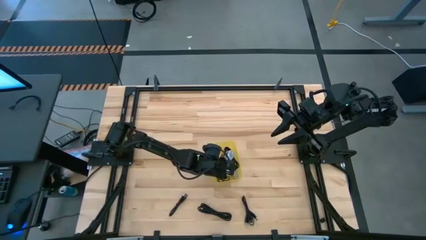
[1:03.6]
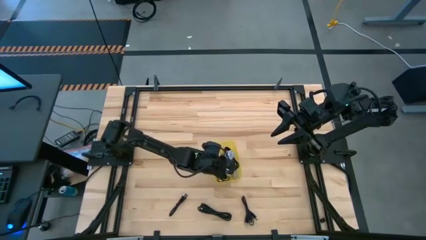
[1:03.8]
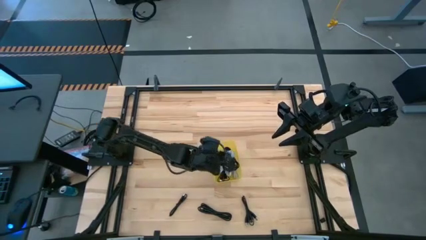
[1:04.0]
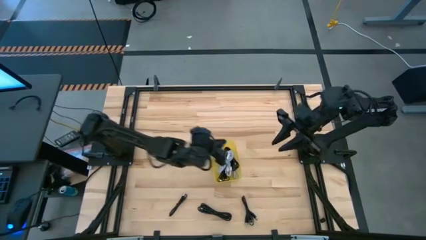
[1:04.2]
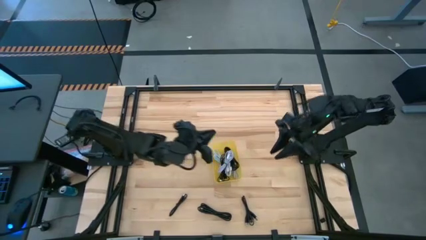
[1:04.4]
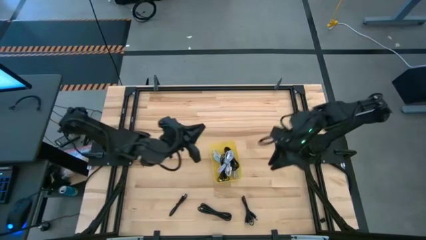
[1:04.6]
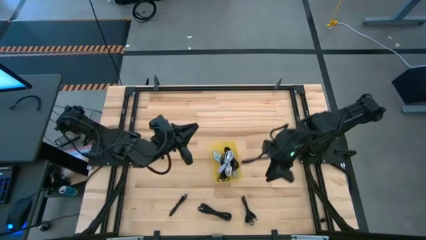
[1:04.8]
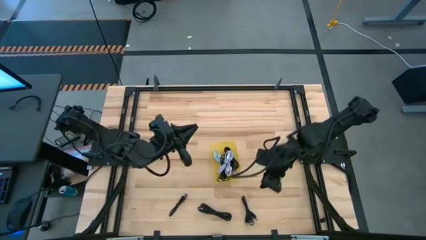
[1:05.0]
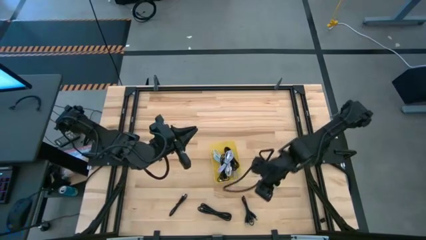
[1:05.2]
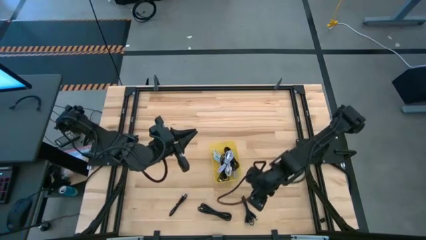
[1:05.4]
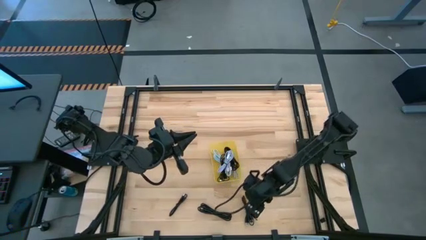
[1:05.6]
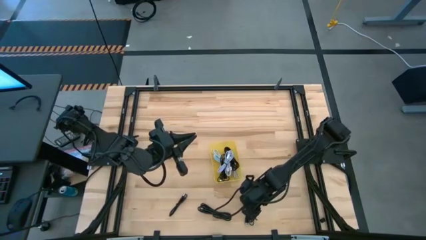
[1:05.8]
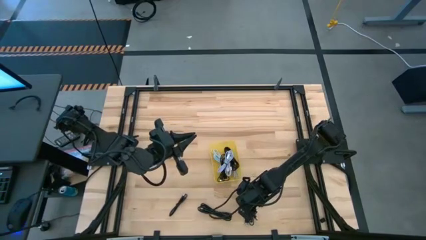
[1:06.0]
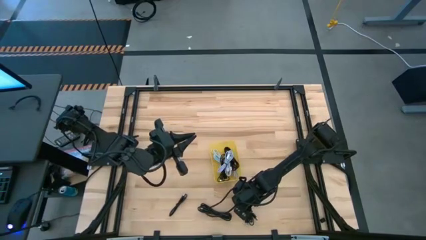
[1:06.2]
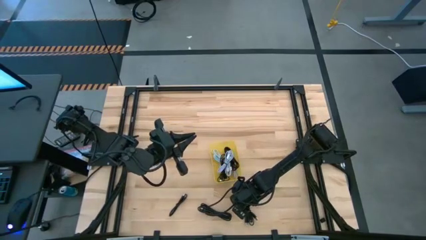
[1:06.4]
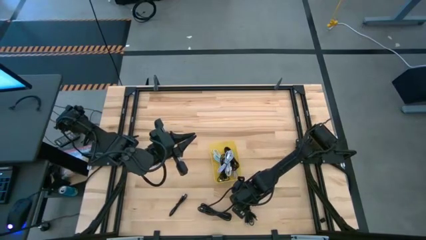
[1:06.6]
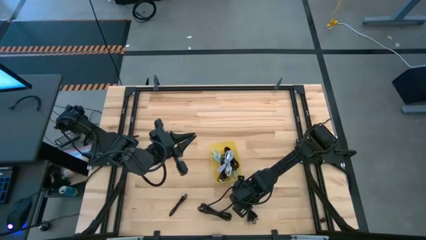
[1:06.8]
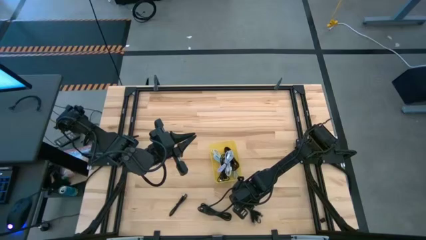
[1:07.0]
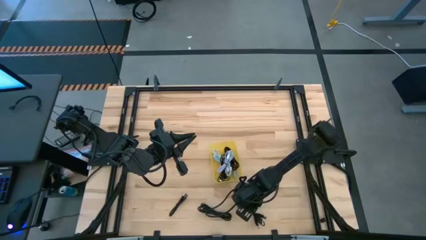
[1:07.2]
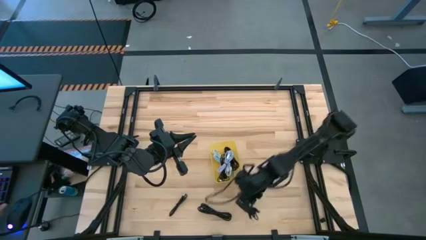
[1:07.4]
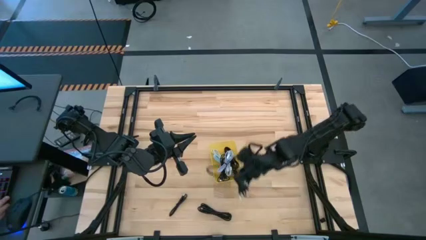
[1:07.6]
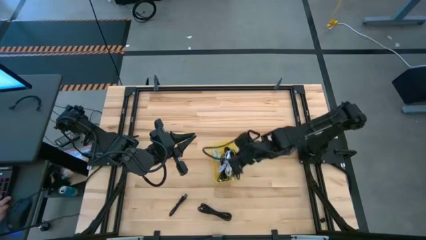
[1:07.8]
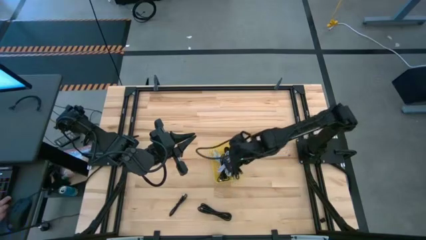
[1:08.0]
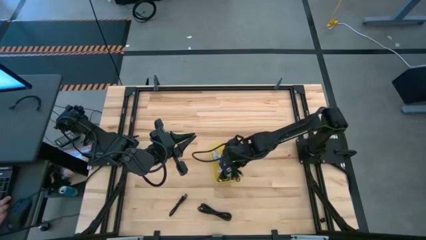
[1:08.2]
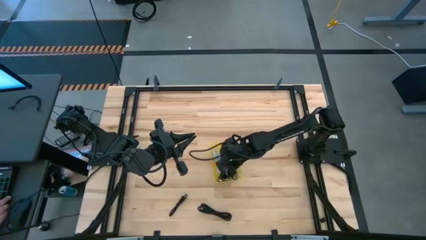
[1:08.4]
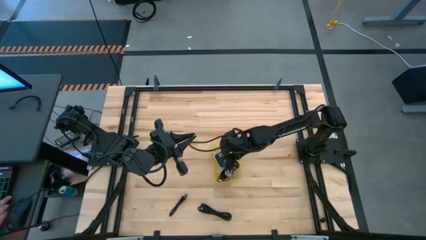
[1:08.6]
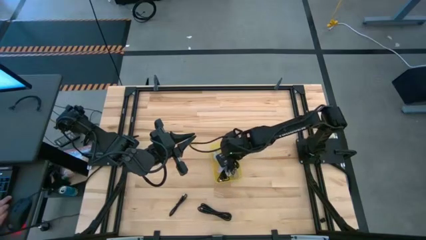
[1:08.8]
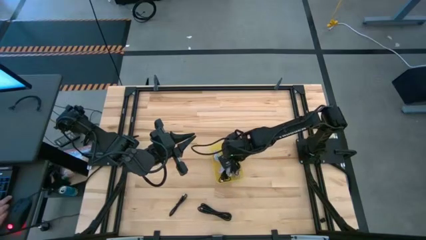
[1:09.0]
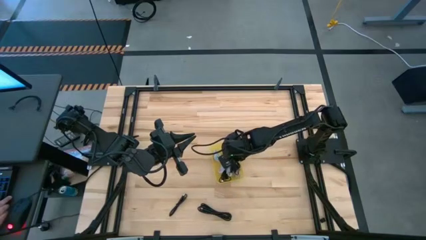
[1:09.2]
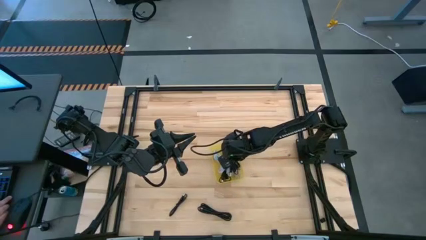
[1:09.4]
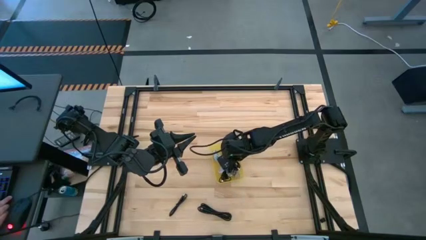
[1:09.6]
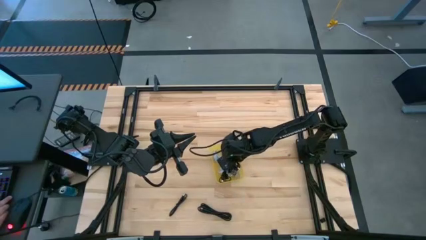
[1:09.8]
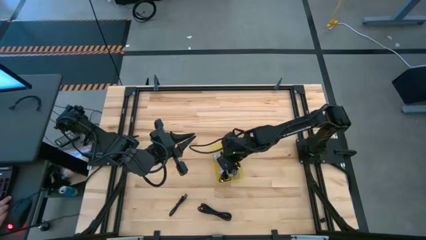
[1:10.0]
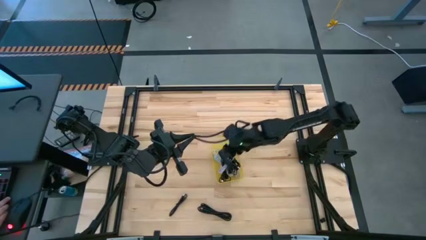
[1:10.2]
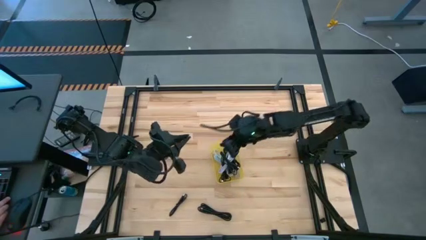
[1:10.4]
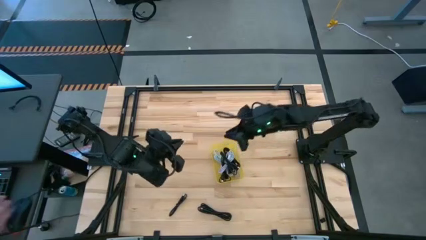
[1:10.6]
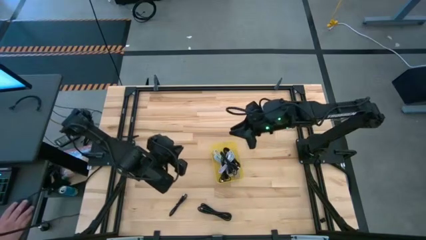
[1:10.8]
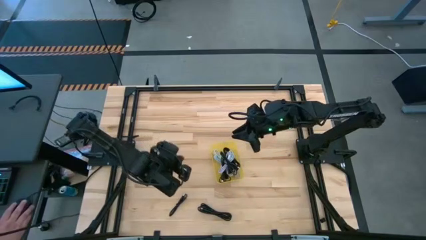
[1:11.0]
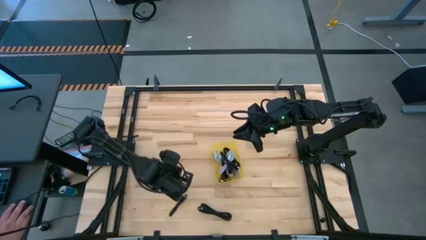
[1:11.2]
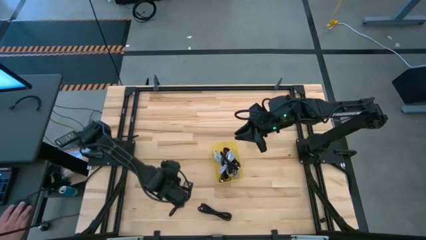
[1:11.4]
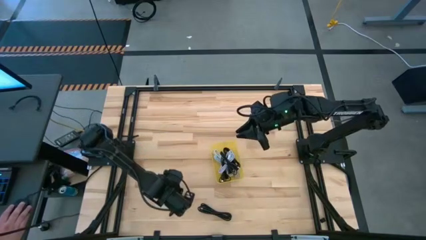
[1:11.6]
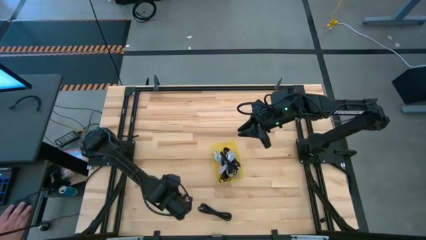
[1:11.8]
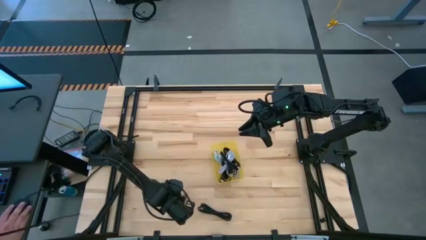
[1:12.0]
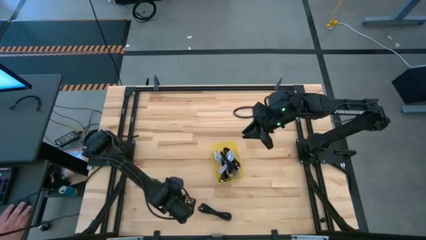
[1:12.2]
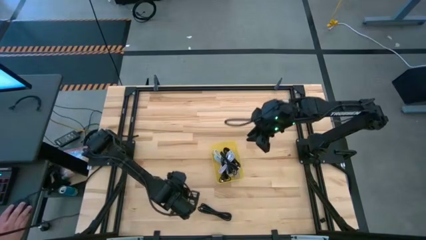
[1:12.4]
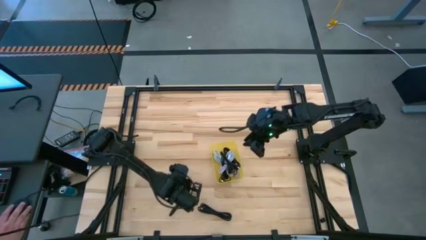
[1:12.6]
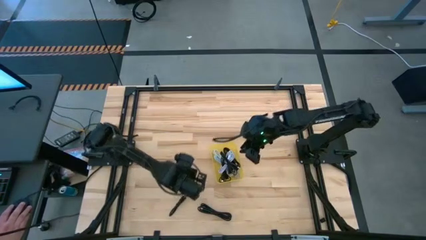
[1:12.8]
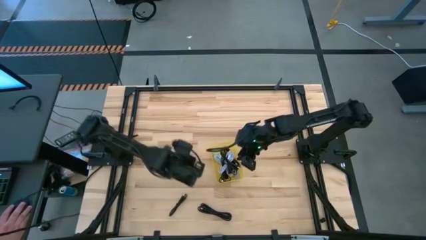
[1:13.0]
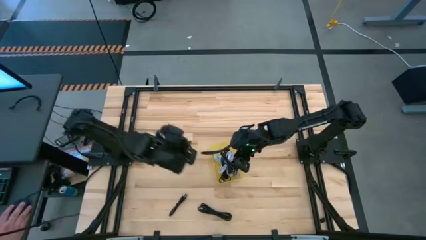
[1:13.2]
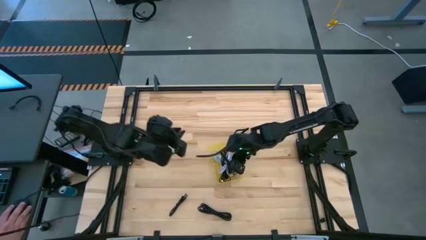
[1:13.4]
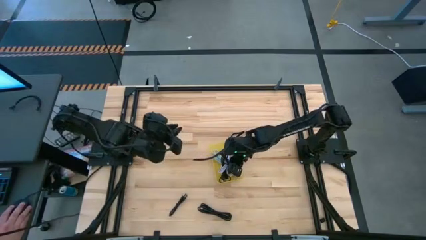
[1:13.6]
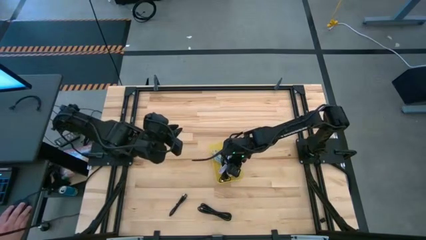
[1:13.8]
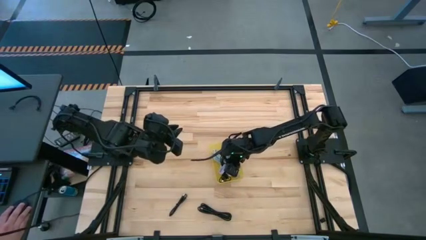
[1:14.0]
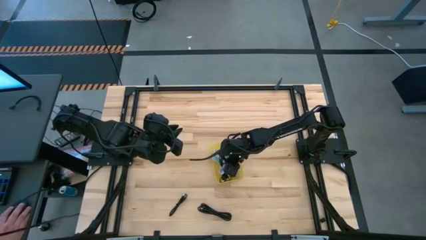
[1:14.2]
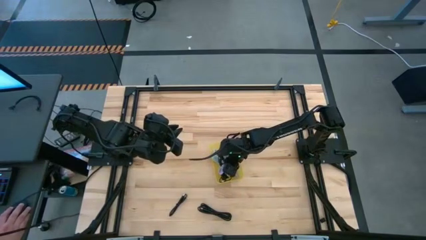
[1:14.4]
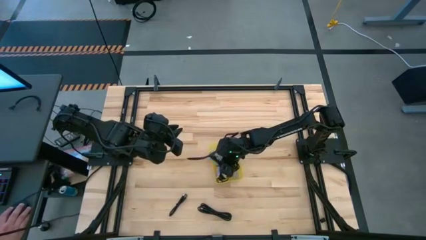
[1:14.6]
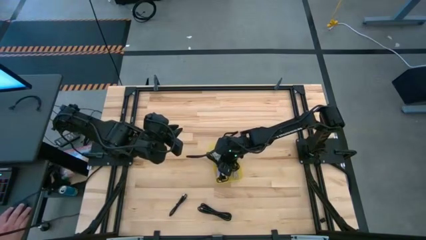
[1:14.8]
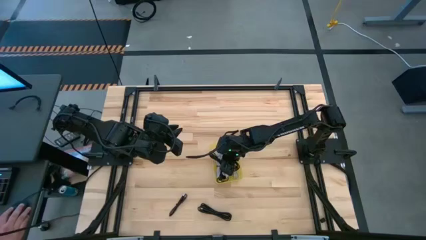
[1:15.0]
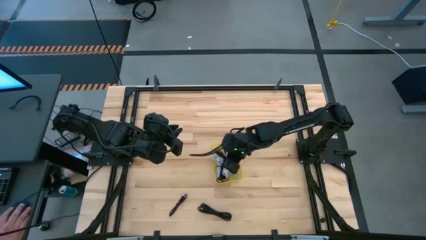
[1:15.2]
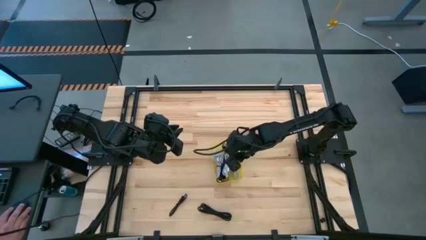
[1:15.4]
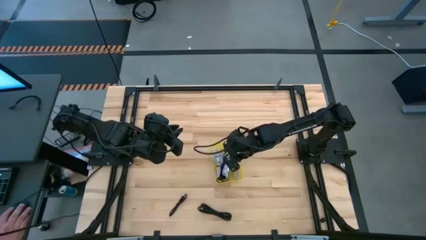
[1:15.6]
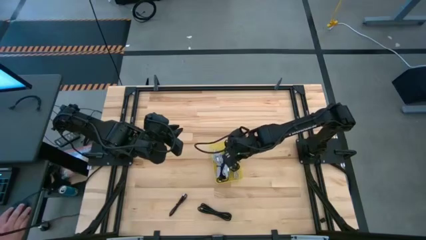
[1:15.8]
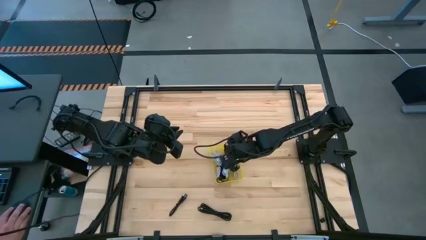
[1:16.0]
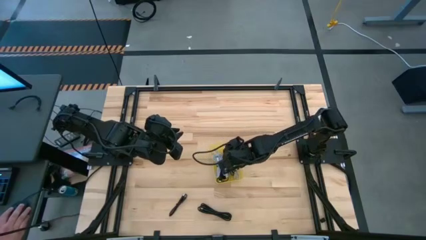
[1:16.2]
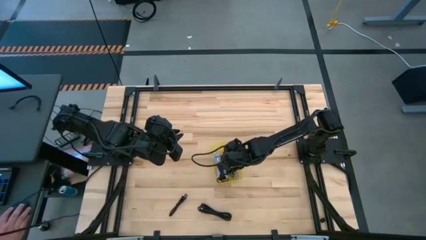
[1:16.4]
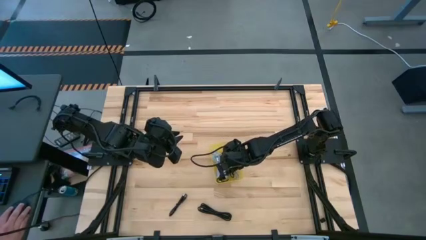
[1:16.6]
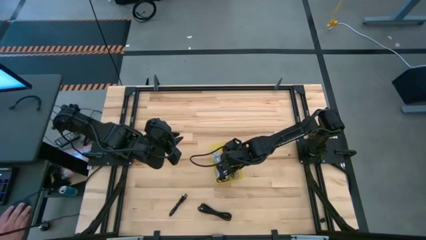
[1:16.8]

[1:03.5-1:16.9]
Task: Pick and place USB-C Cables
Put the black charger cable into the yellow bin

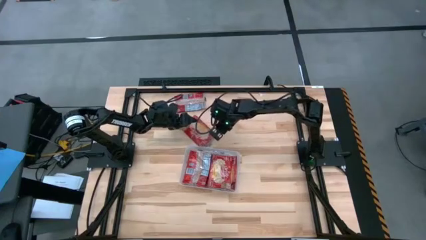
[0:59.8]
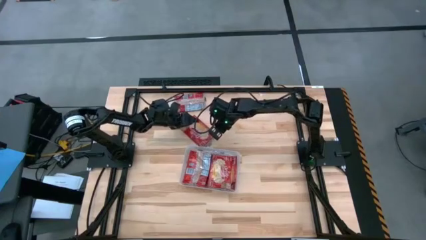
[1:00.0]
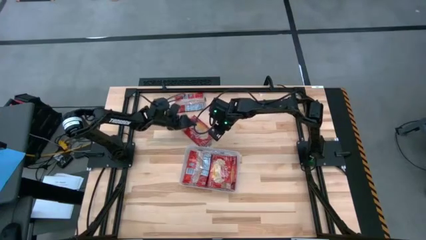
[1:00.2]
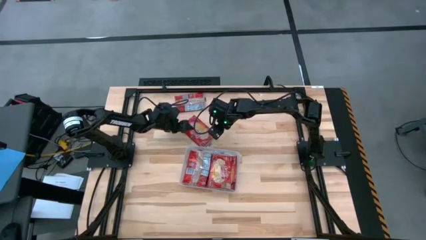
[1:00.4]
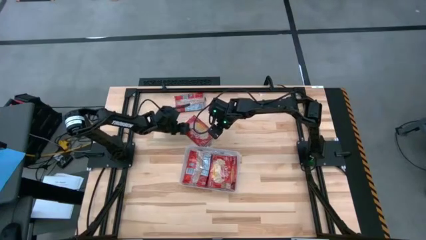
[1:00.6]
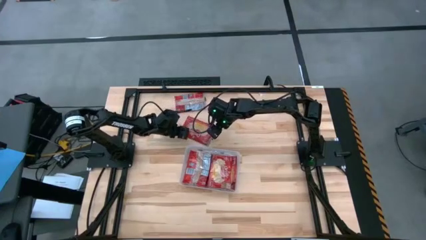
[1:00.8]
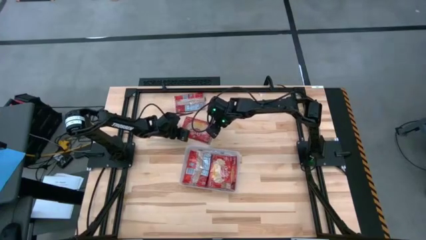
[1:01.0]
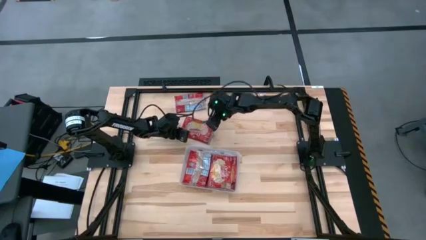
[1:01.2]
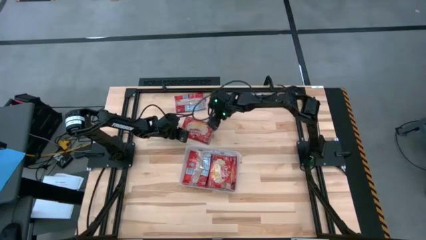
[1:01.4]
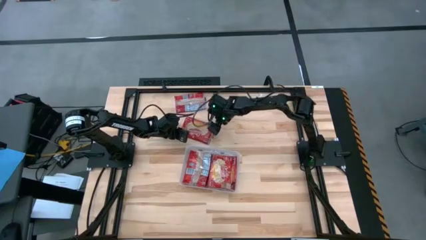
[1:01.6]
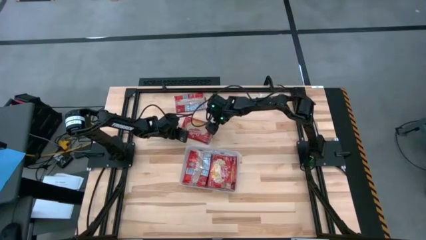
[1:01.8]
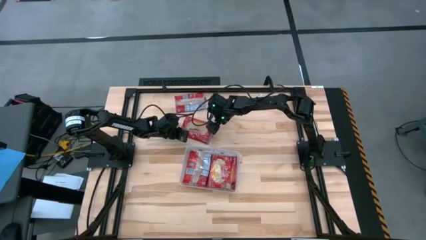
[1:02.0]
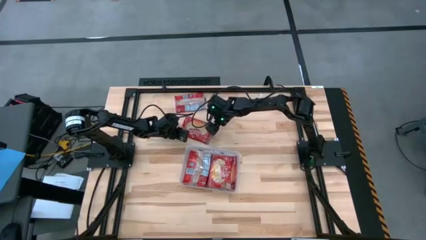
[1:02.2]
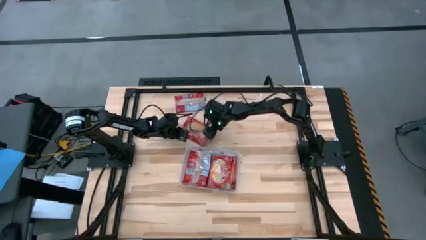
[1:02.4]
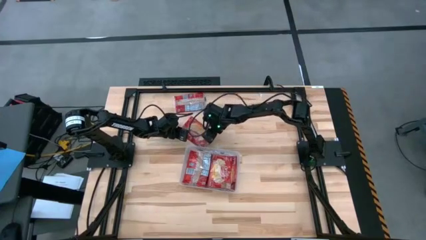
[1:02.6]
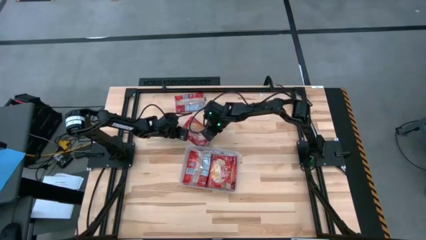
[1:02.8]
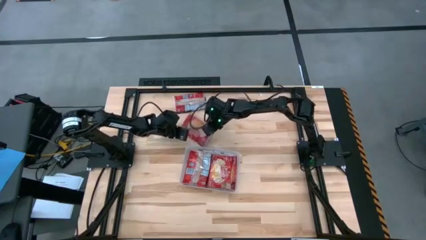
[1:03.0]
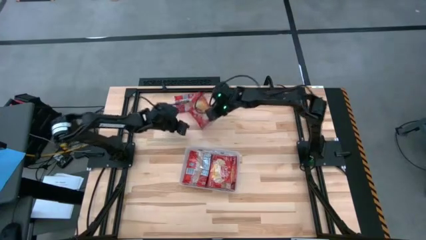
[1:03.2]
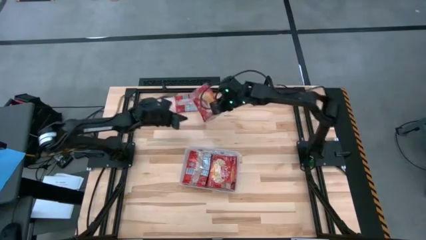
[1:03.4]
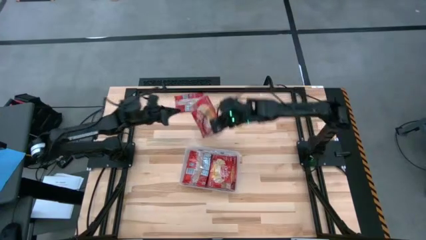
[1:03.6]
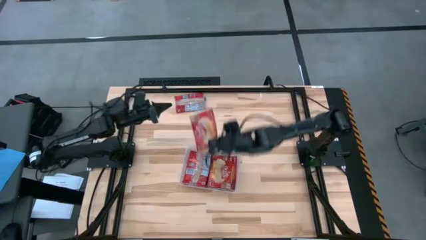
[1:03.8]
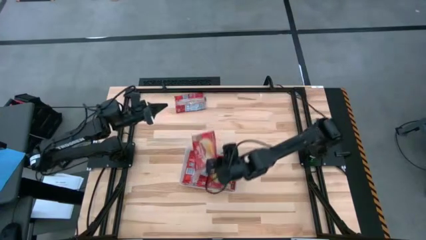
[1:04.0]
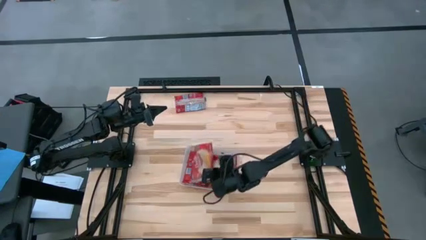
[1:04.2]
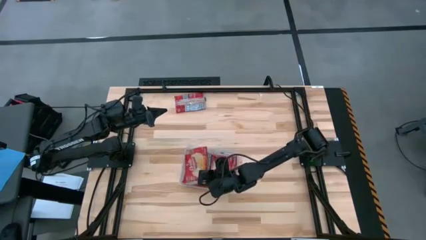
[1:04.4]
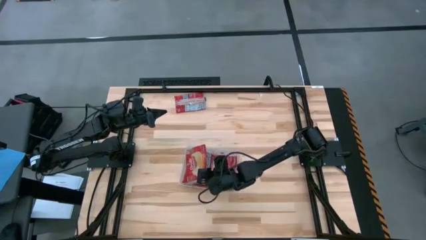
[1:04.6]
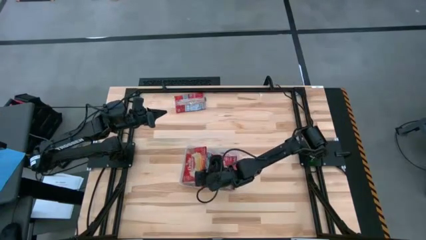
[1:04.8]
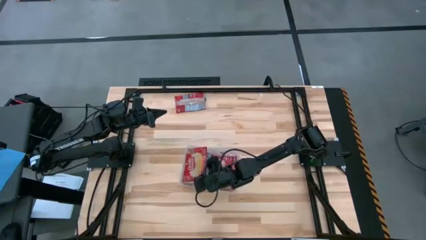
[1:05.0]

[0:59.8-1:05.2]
Task: Sort popcorn bags into baskets
Put the red popcorn bag into the transparent bin
